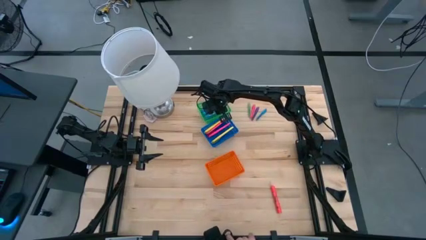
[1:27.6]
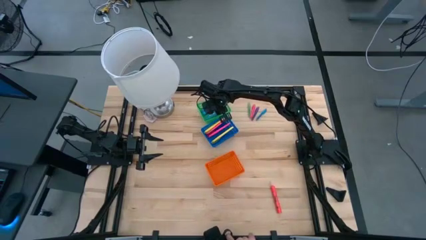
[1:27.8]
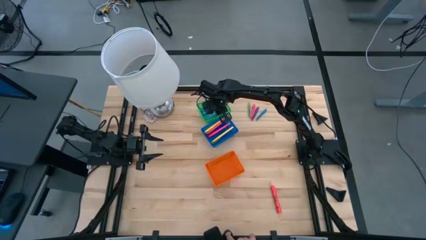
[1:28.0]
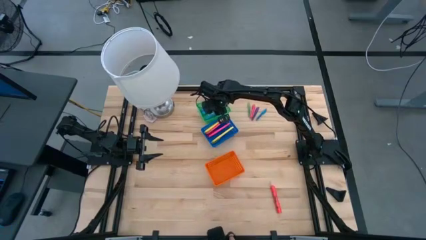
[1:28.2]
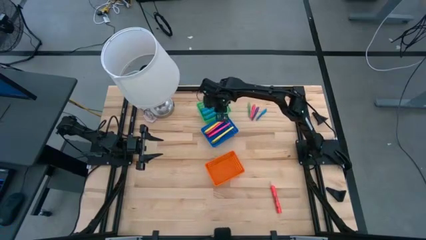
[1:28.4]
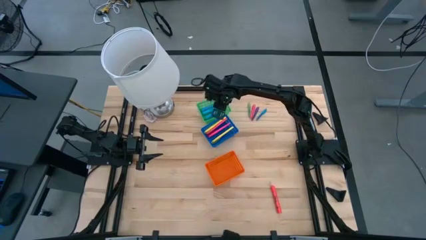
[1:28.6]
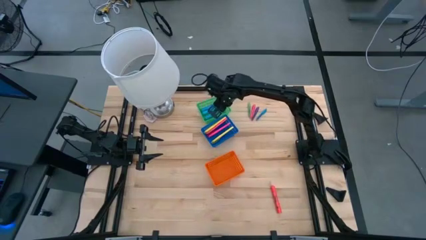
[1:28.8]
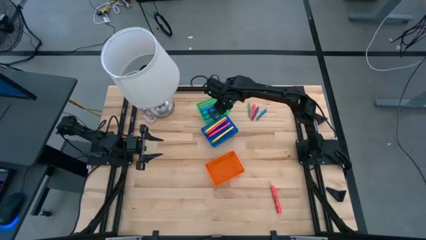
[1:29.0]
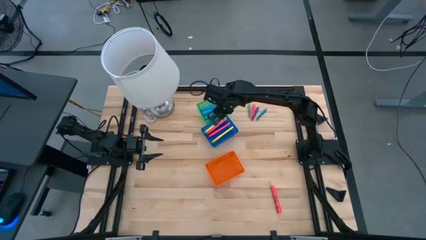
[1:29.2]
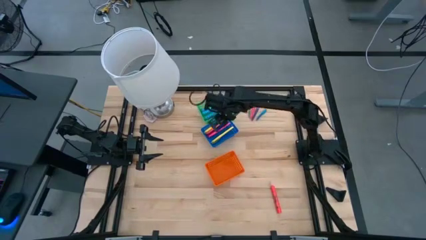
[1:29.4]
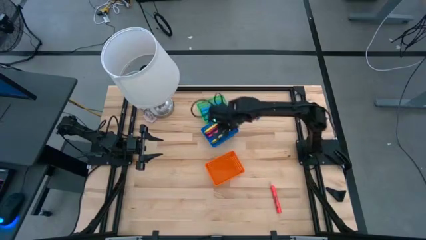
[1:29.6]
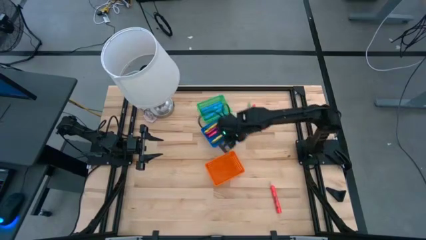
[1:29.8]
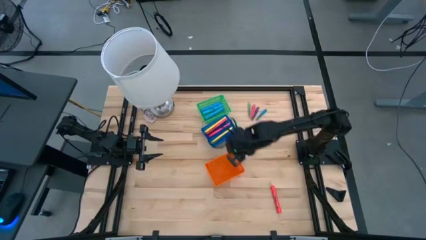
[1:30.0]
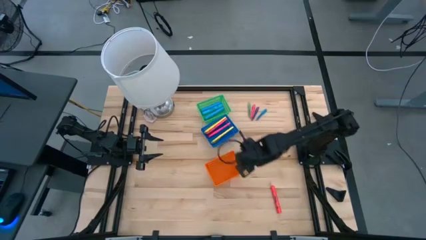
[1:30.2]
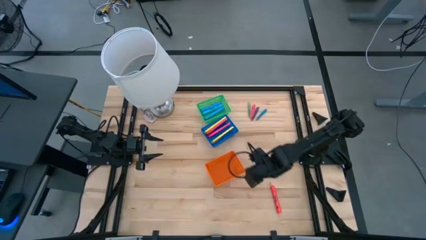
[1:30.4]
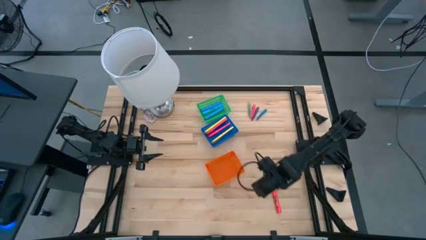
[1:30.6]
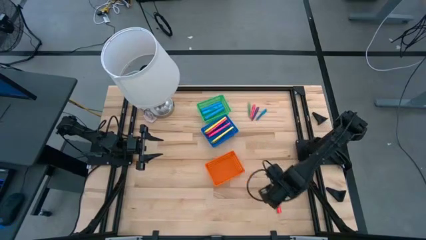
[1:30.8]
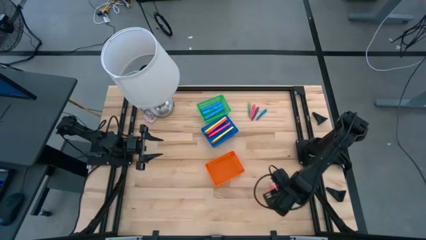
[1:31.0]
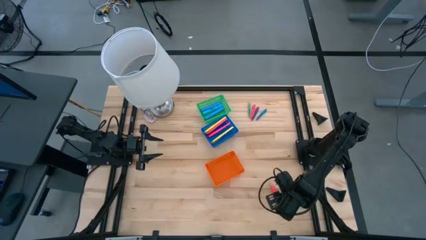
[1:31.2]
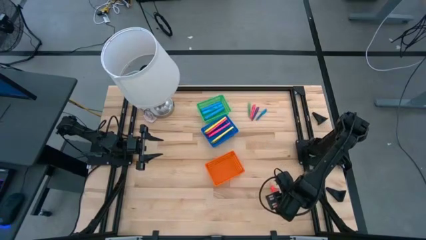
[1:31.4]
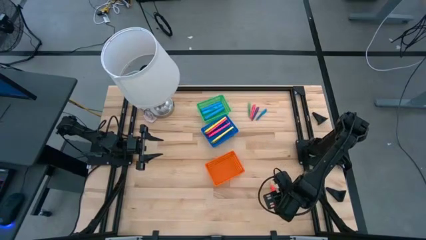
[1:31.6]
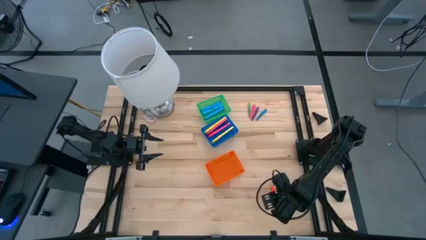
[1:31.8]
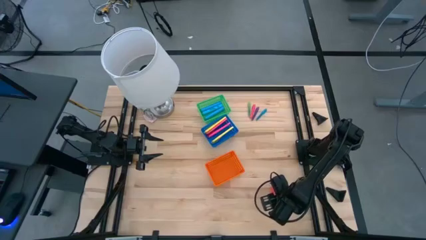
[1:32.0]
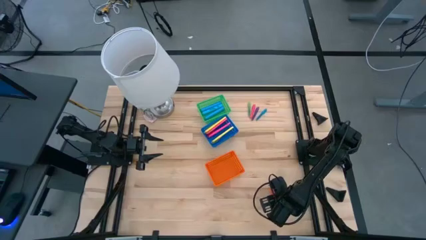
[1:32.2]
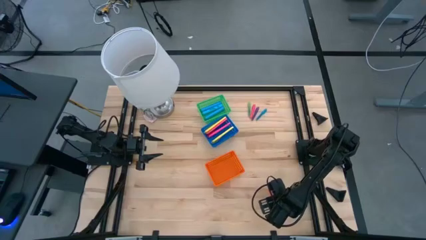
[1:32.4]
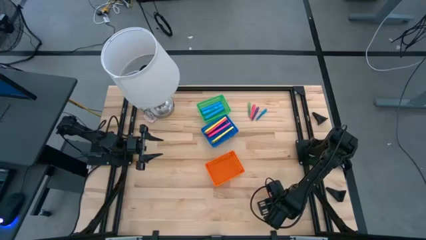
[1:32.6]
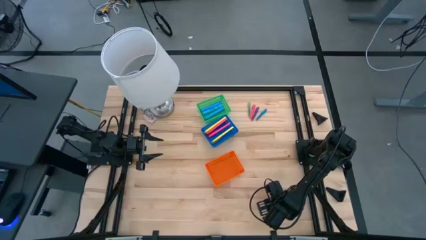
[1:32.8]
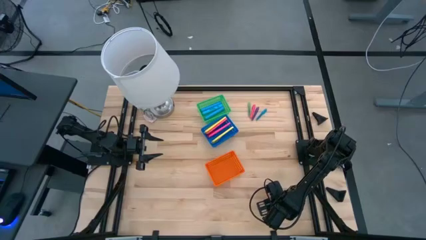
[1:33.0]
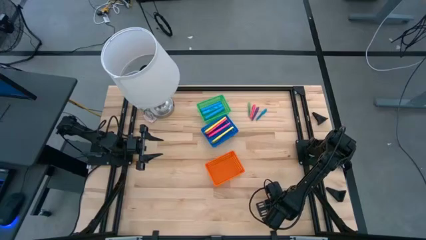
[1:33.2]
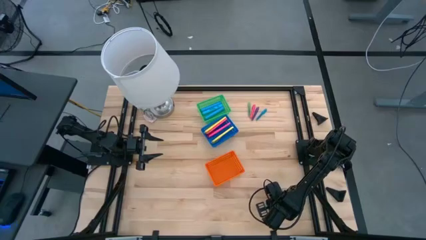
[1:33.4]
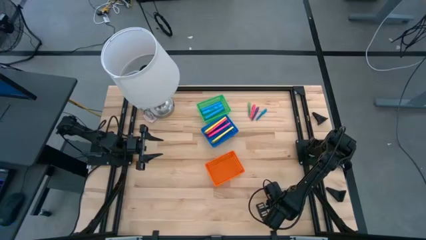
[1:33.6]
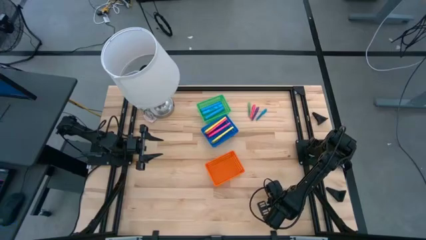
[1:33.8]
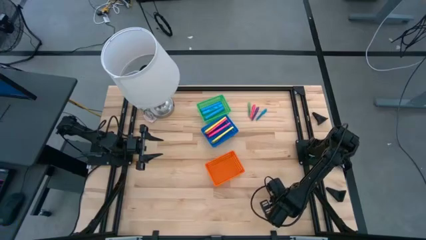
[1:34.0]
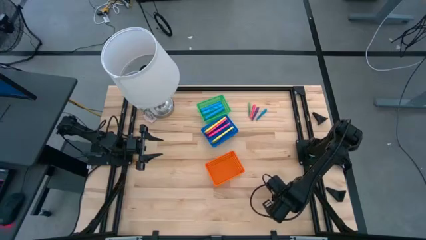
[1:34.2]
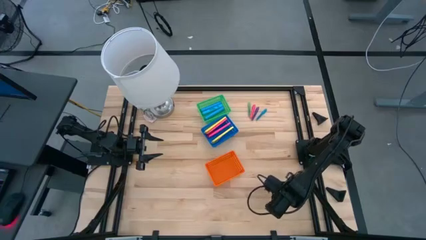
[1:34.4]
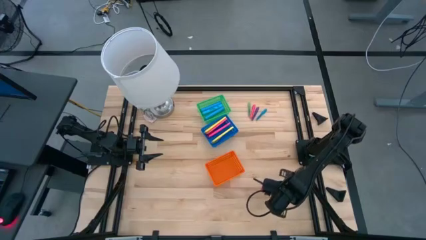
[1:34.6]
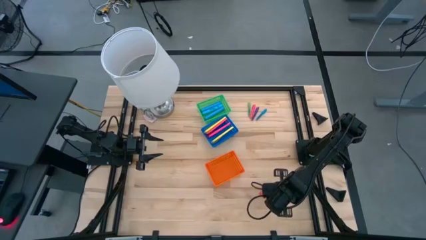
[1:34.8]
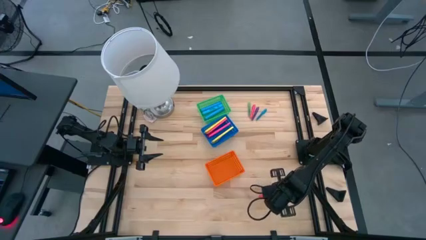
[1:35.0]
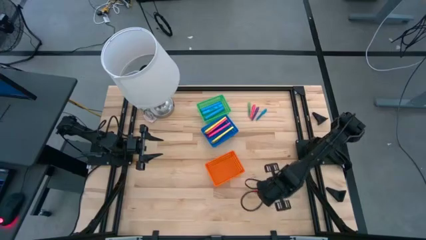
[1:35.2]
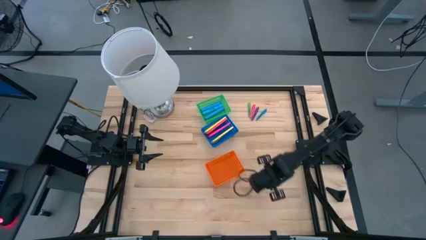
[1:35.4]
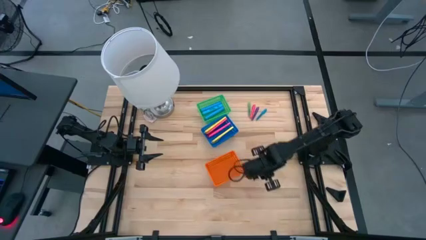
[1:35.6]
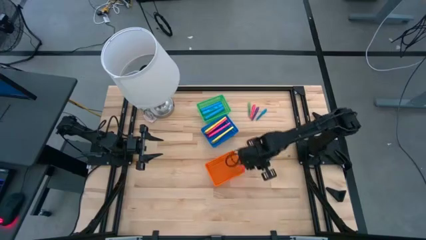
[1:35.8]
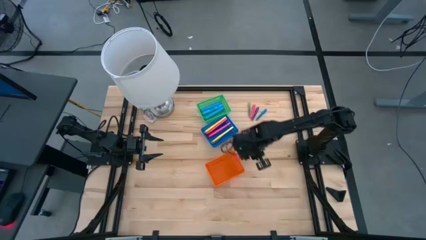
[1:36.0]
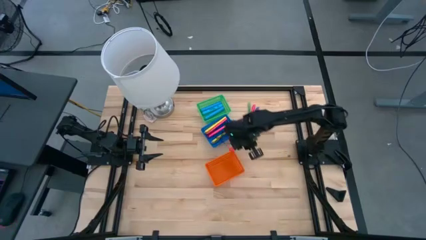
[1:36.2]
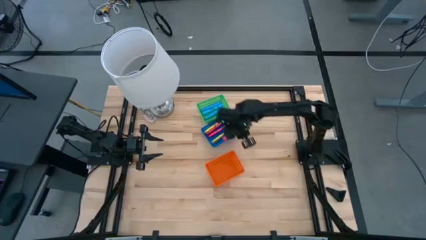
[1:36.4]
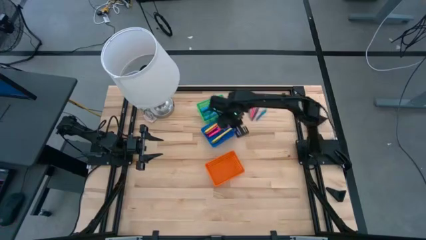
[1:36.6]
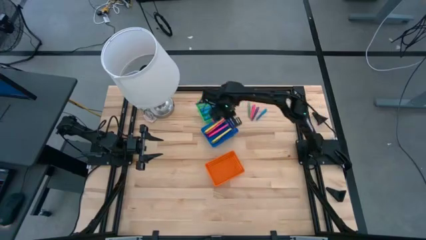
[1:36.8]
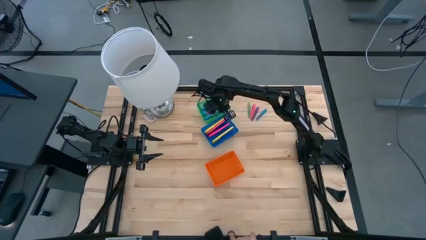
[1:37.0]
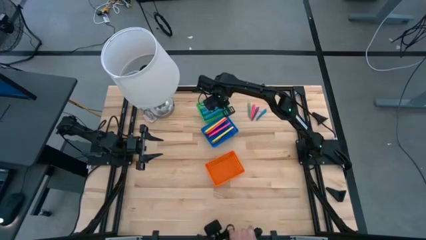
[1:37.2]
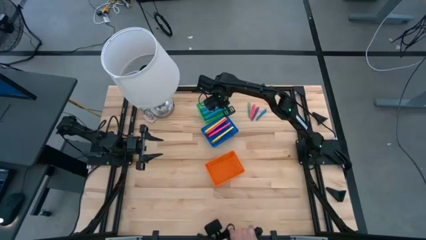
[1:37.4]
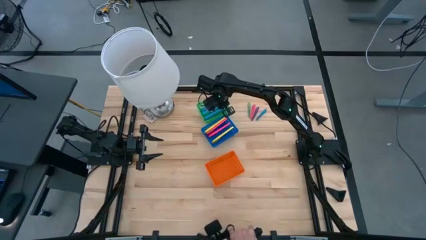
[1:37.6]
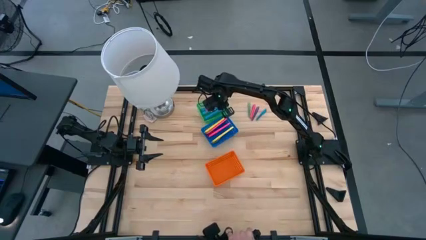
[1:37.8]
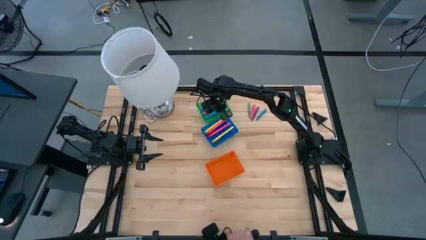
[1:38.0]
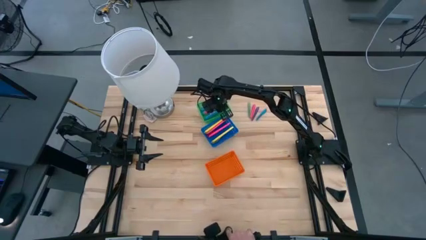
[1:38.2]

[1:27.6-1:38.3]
Task: Pick & Place Markers
Put the red highlighter pen into the green bin

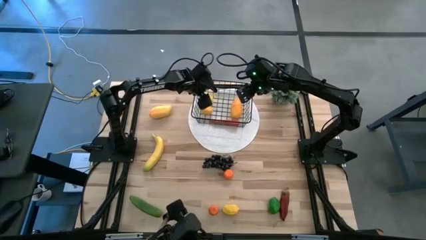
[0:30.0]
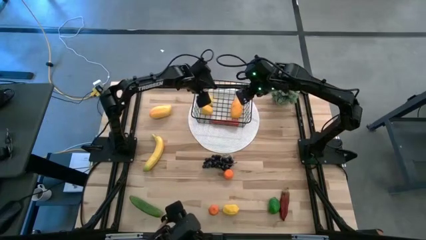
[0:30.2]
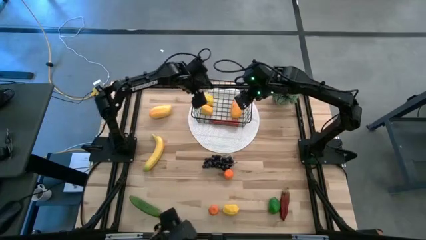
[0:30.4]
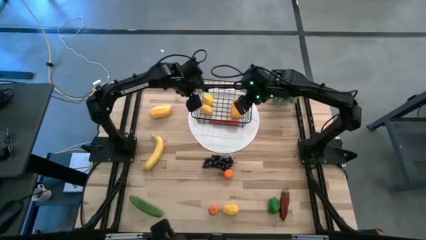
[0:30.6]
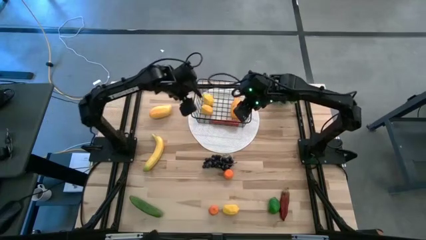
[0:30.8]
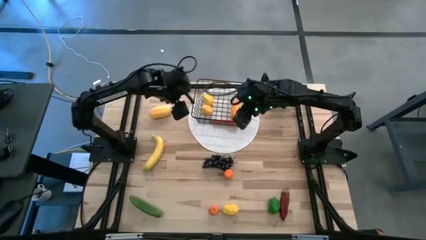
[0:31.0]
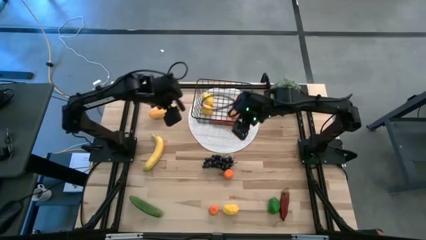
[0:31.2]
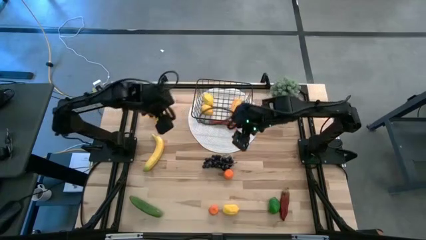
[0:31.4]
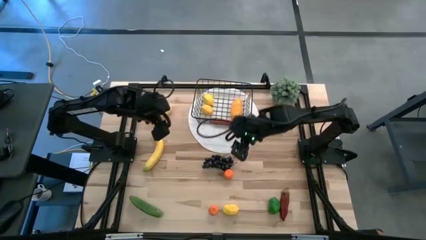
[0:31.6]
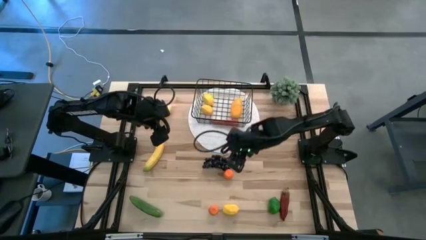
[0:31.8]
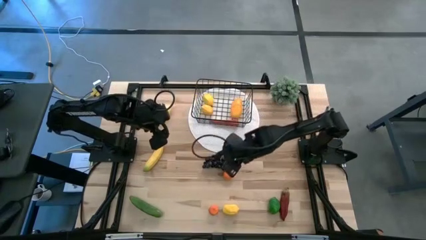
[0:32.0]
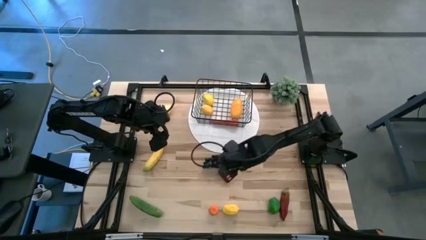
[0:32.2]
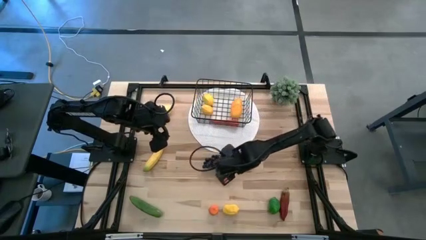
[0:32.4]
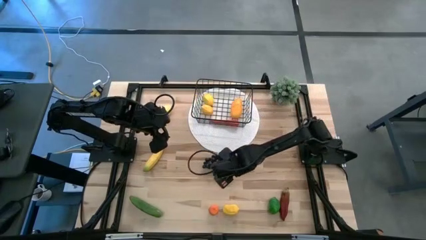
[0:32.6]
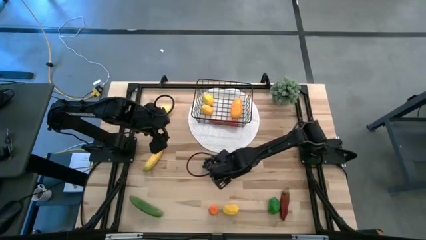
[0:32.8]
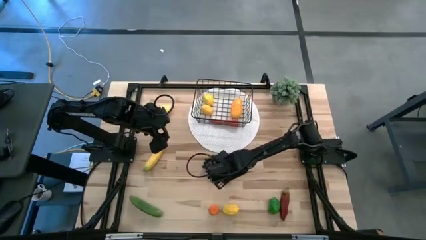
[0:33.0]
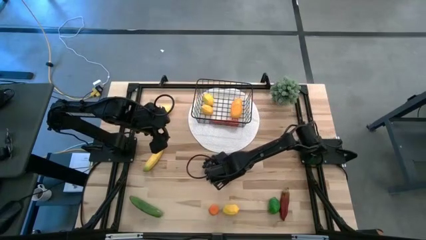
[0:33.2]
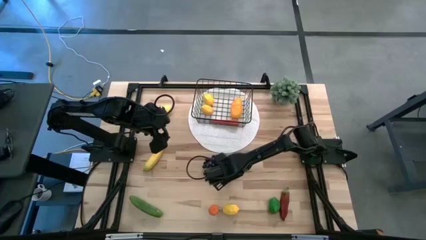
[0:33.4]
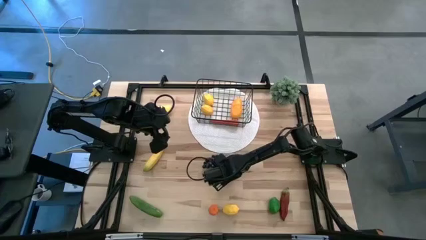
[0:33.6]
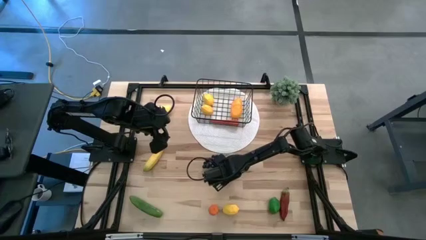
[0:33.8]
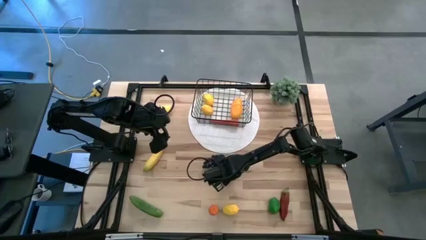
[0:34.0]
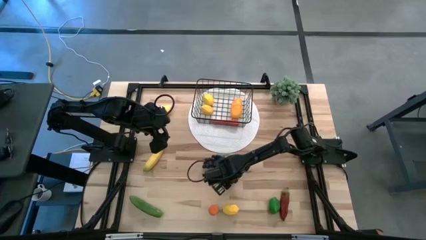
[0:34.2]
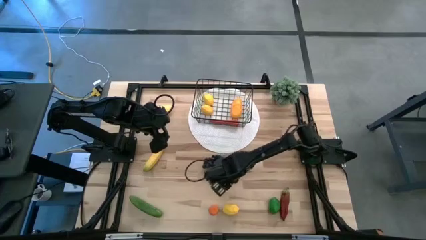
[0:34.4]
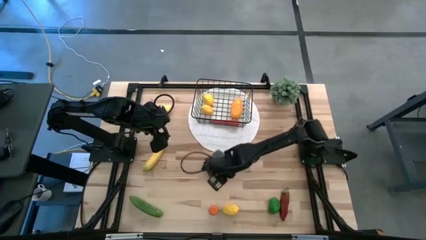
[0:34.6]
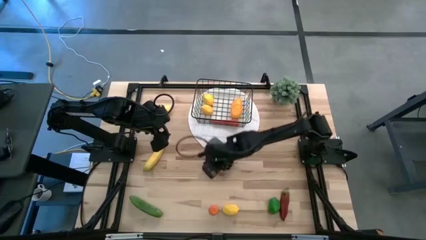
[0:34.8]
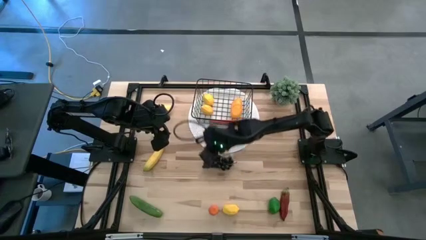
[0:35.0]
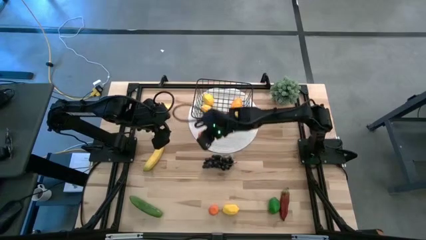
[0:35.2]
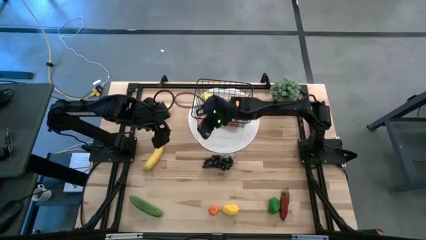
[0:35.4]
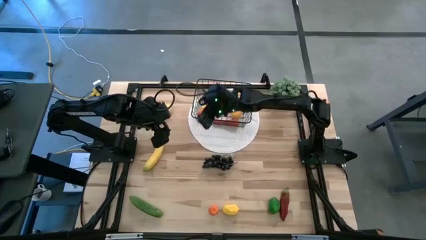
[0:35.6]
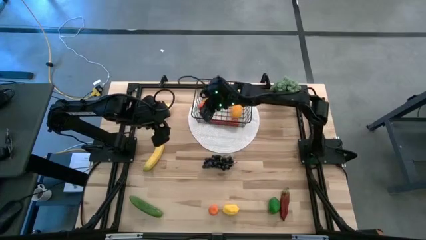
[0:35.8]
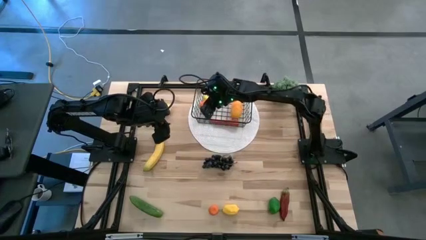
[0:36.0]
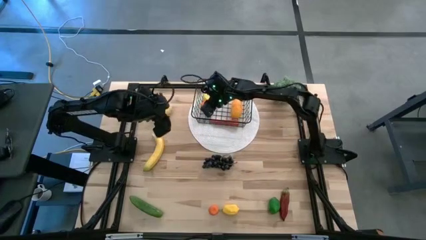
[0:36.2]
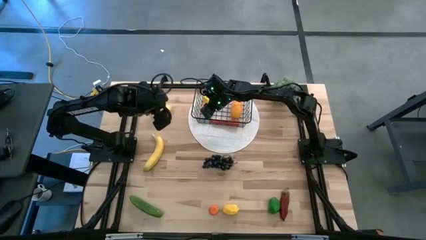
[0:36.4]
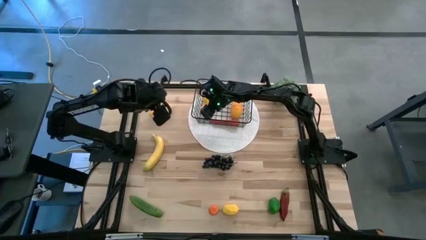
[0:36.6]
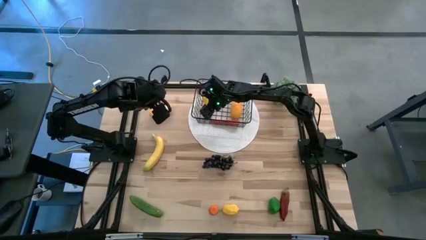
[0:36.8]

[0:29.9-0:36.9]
Task: Build produce basket
Put the top orange into the mesh basket
